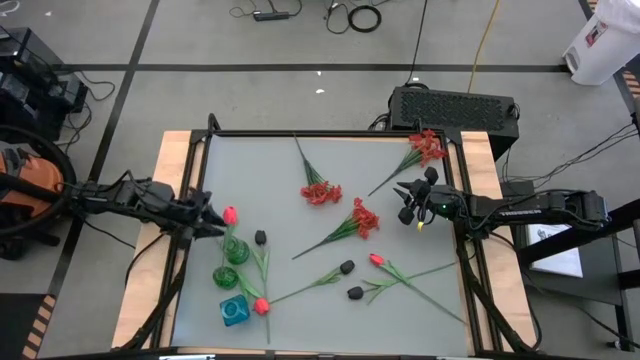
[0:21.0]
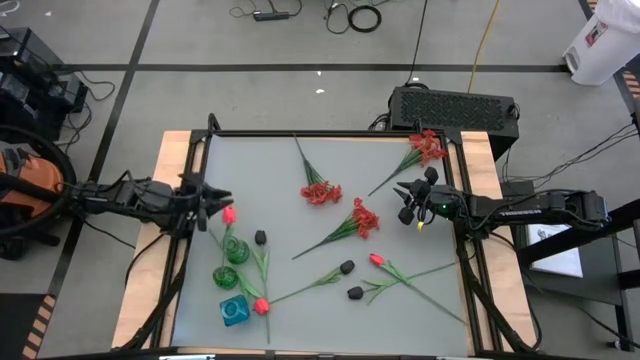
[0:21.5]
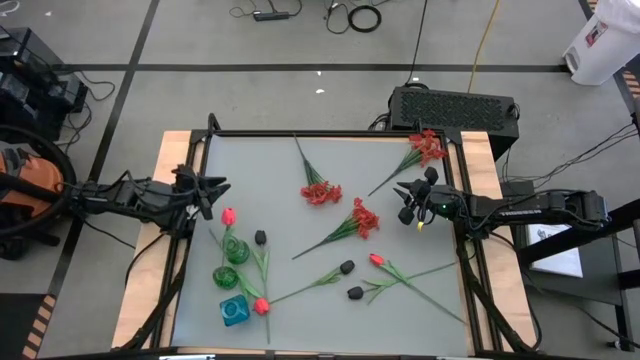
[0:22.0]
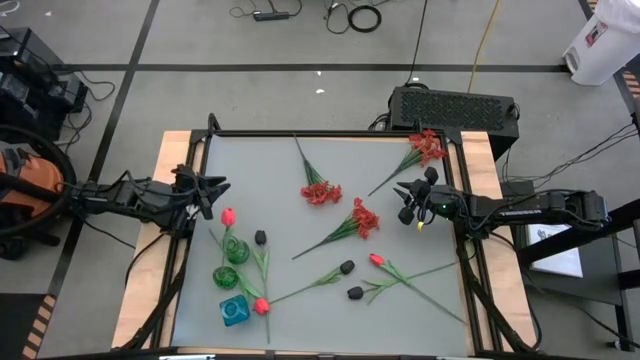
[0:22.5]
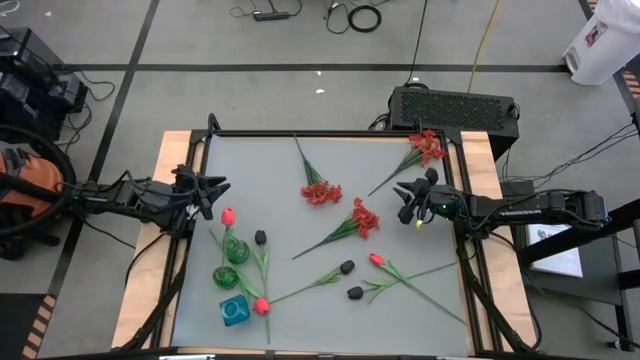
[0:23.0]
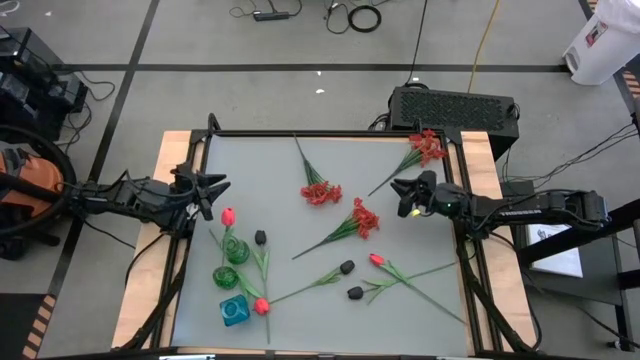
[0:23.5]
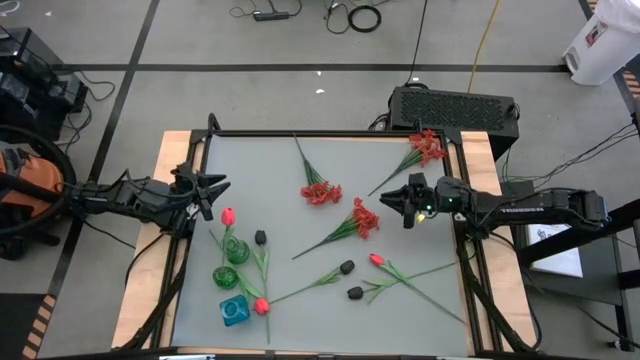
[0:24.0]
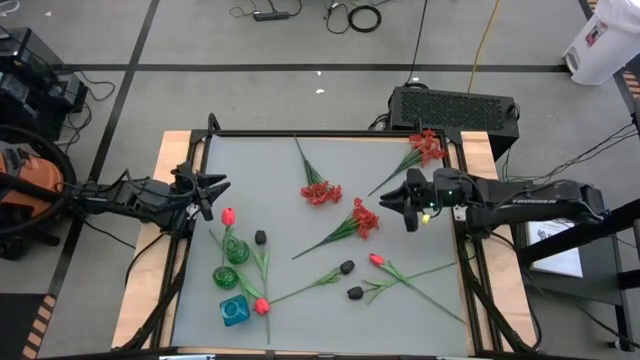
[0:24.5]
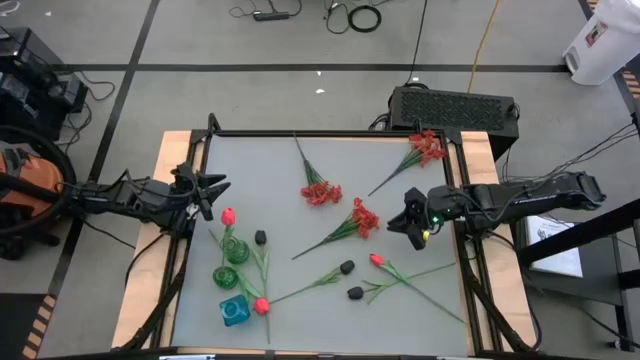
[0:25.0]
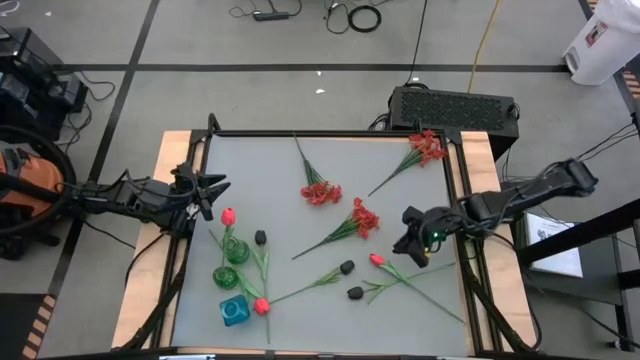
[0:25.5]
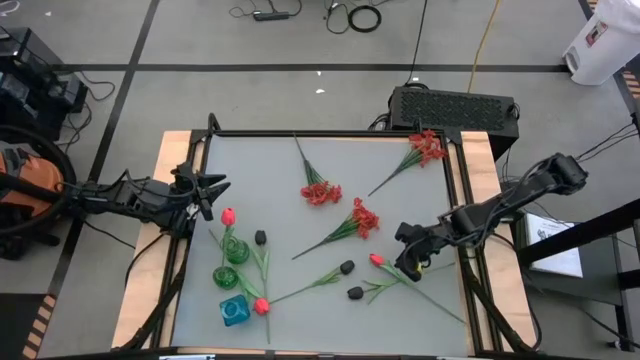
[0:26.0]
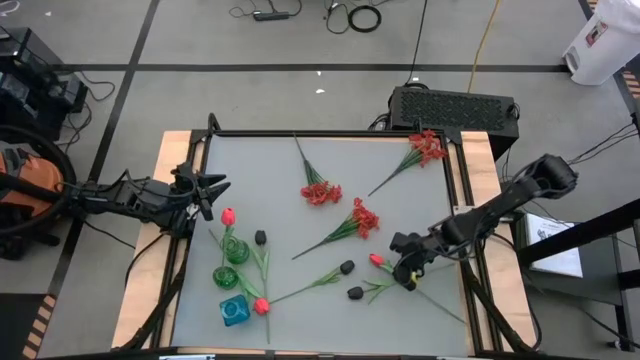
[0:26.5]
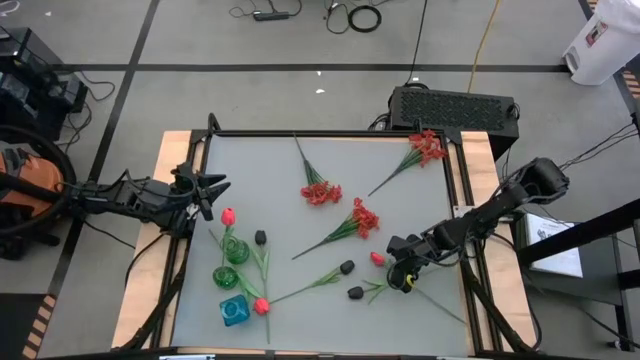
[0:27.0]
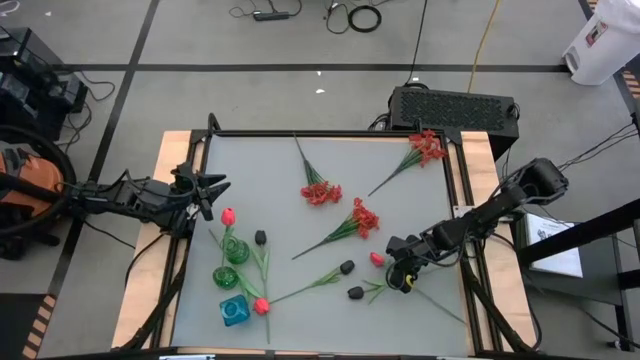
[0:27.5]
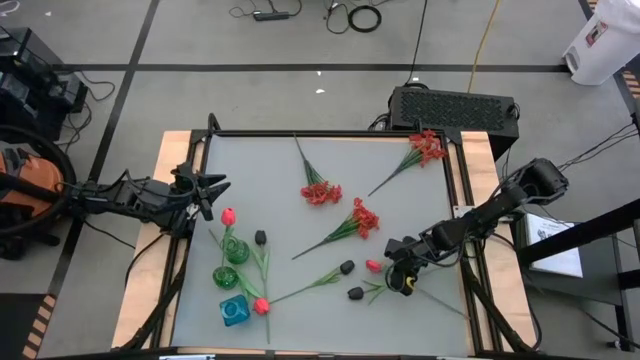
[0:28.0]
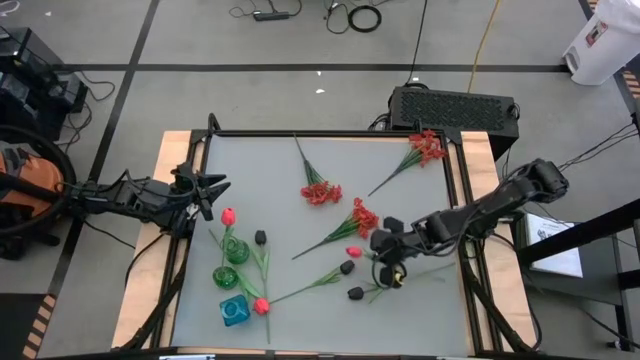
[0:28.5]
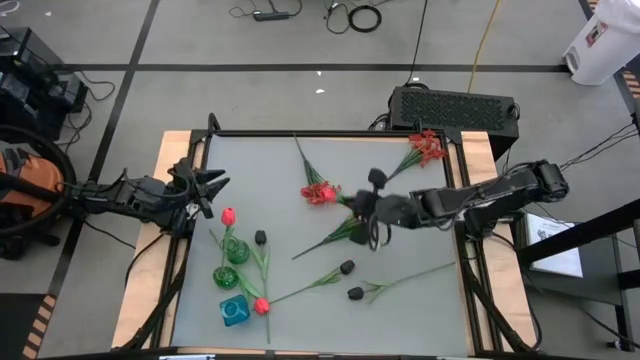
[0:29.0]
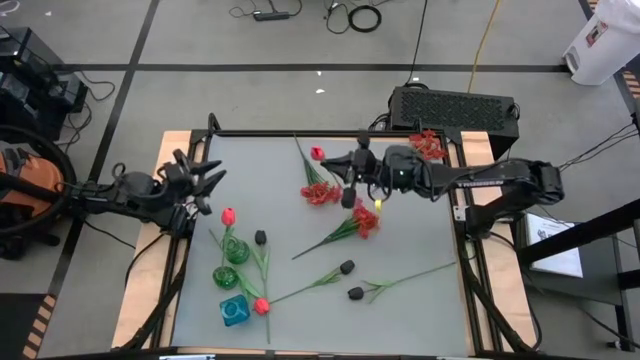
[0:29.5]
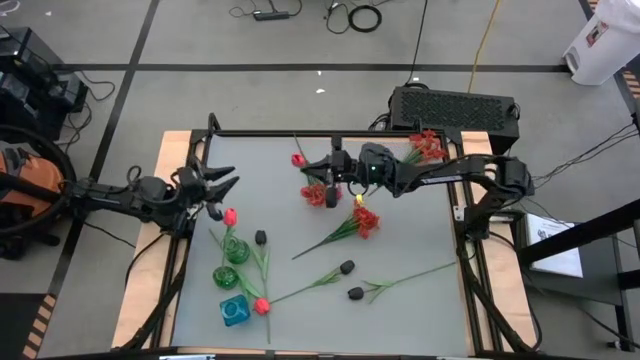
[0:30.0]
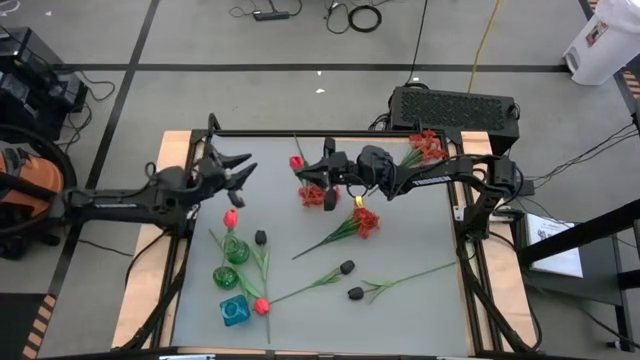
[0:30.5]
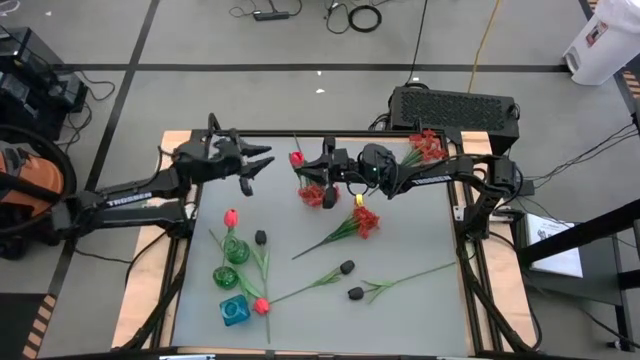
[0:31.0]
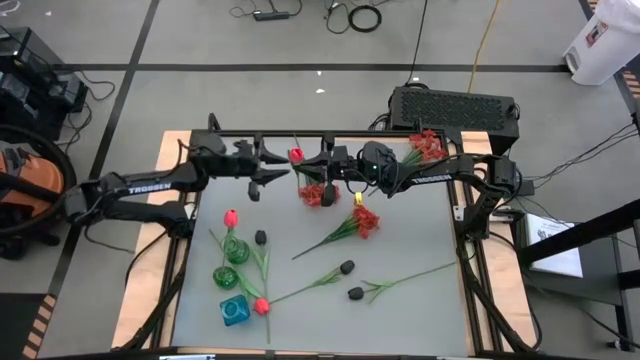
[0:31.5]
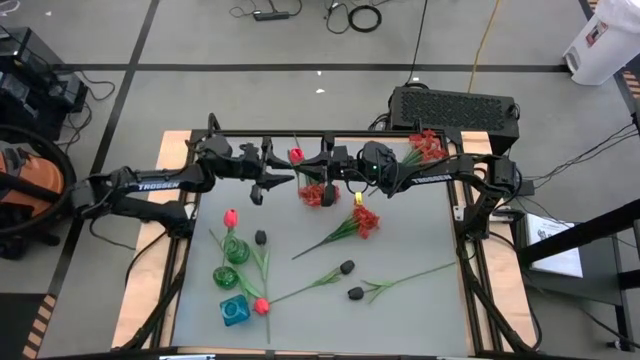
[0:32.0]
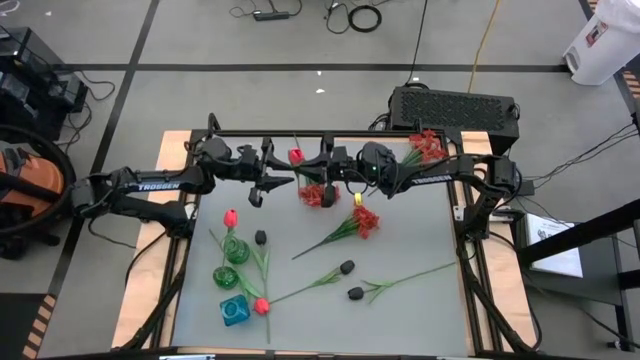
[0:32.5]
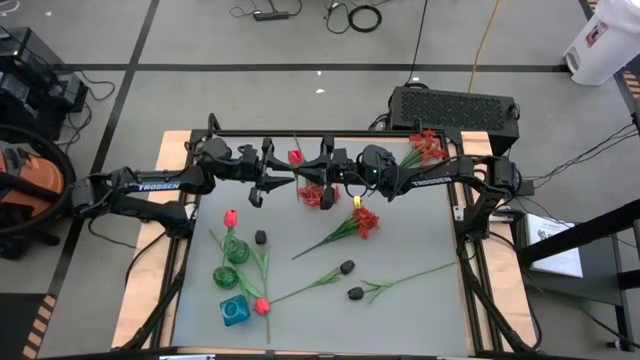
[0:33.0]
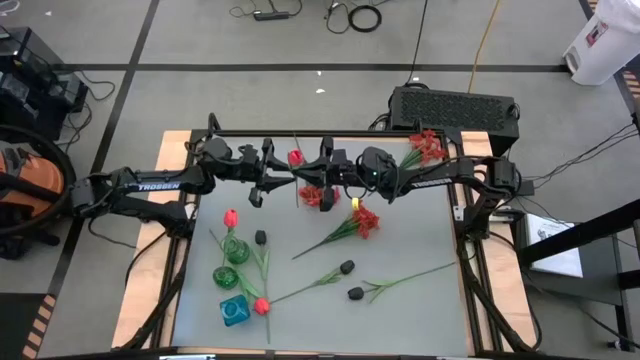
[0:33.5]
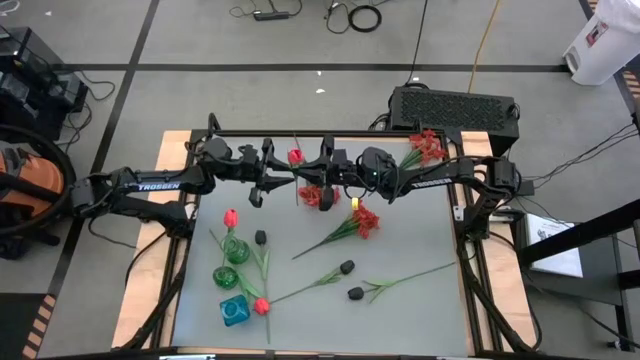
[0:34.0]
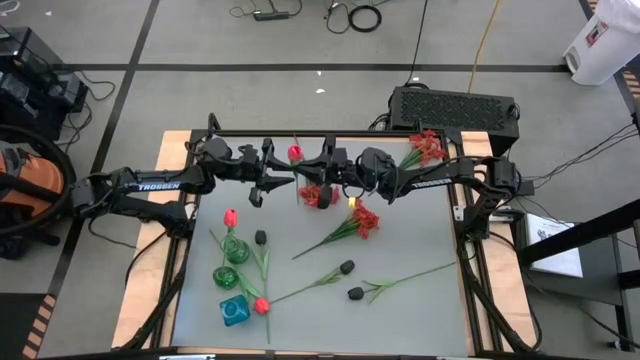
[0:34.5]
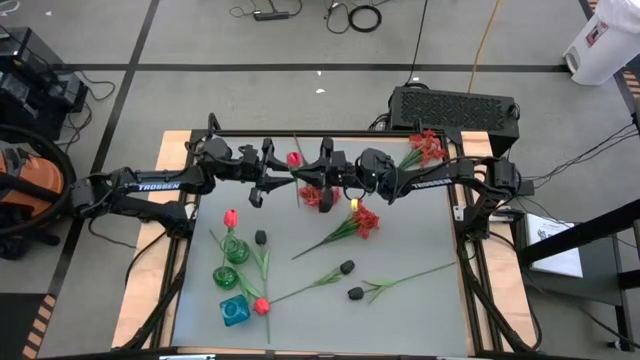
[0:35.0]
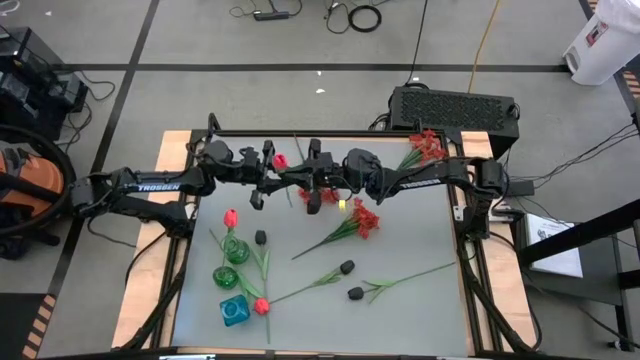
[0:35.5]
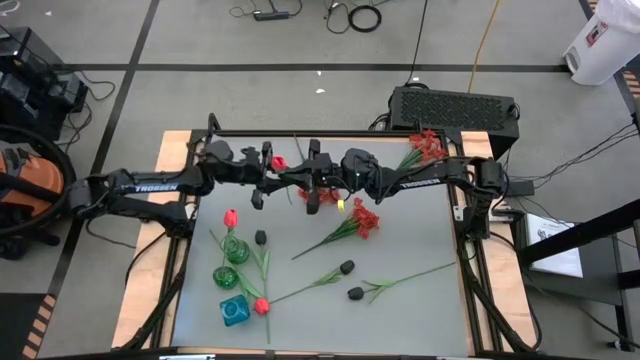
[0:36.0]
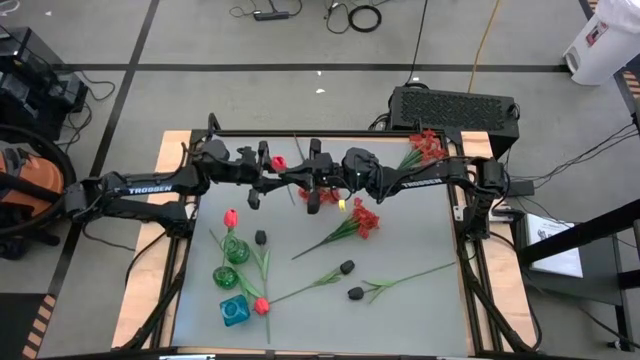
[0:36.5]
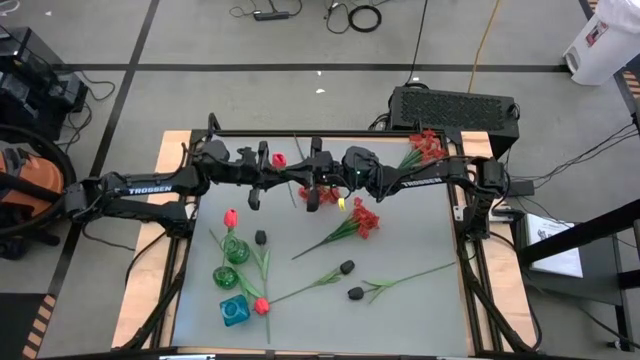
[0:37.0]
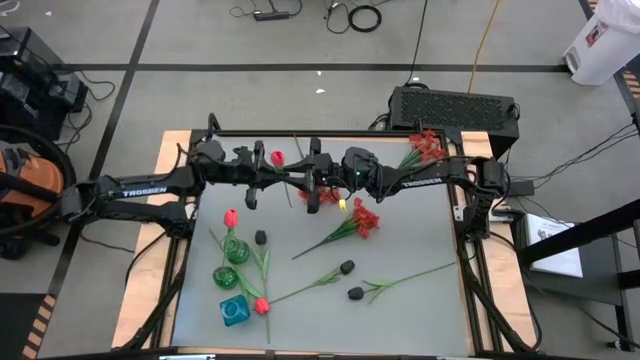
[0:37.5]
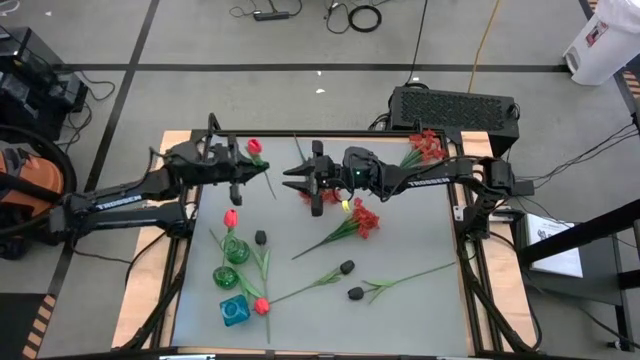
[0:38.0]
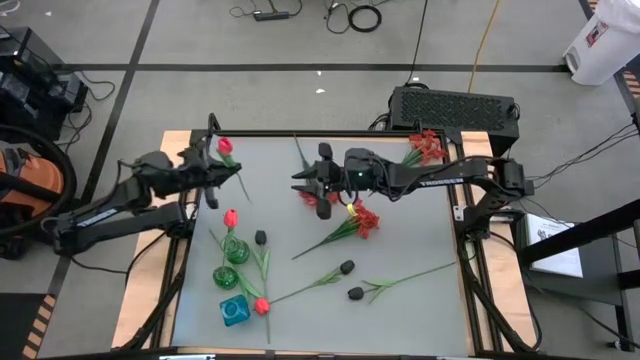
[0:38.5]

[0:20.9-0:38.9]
Task: Sort flowers into vase by color
Put the right light orange flower into the bottom green vase

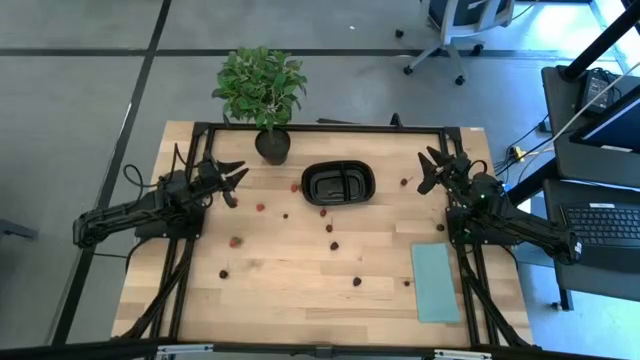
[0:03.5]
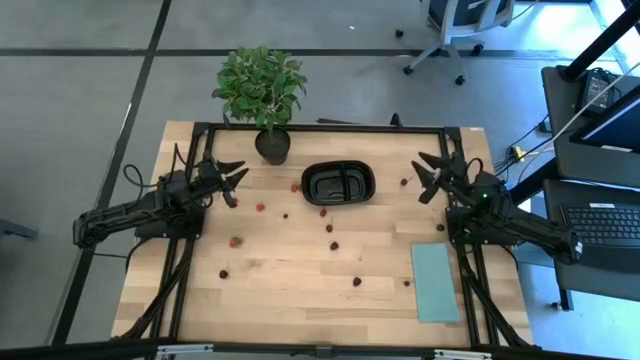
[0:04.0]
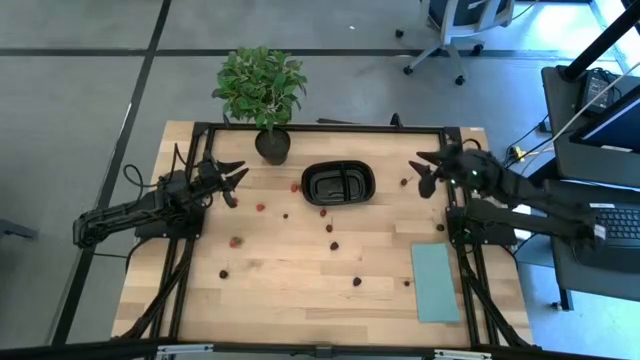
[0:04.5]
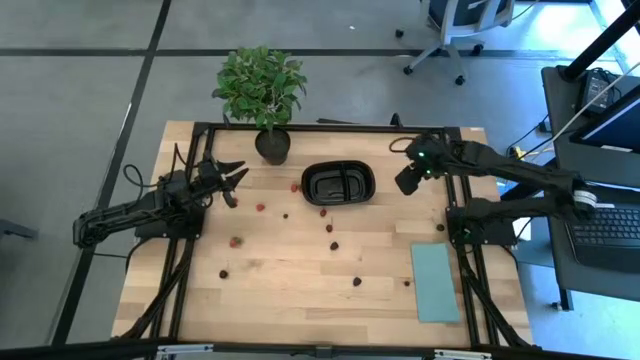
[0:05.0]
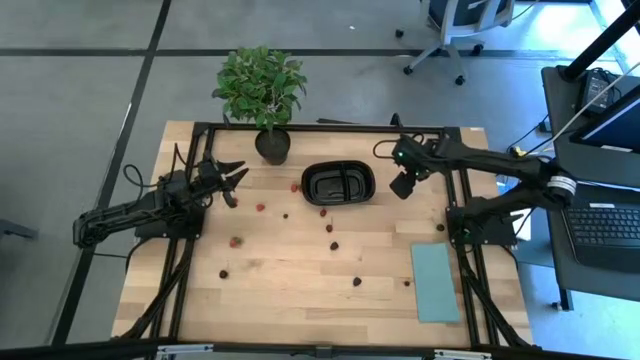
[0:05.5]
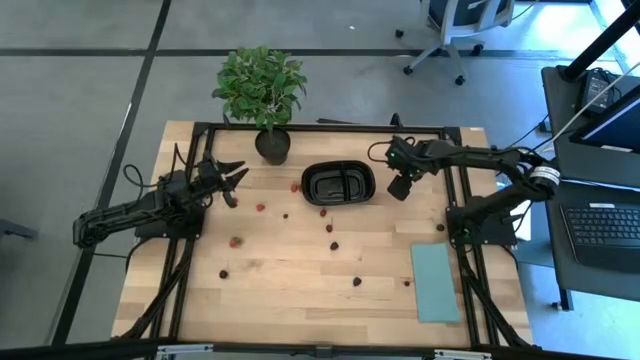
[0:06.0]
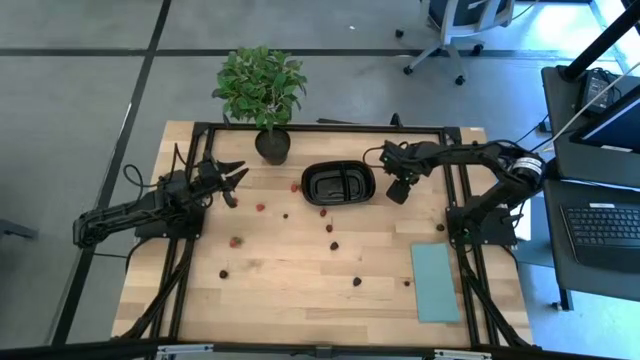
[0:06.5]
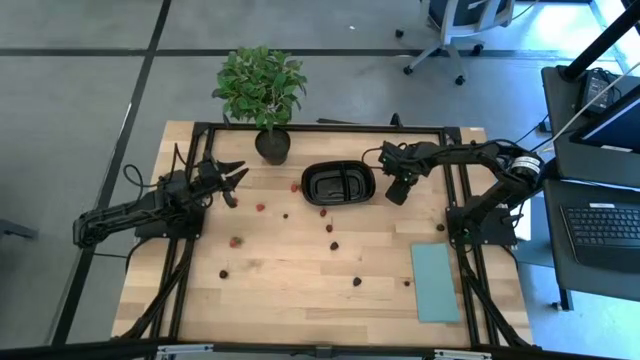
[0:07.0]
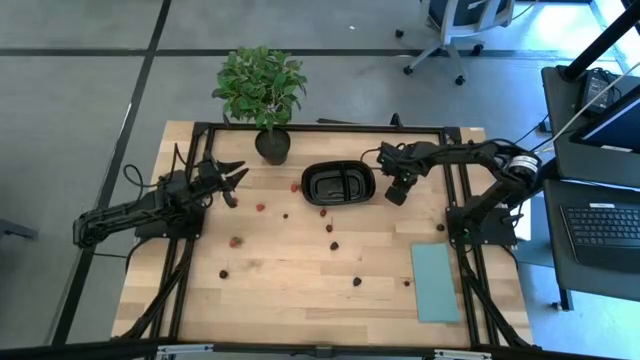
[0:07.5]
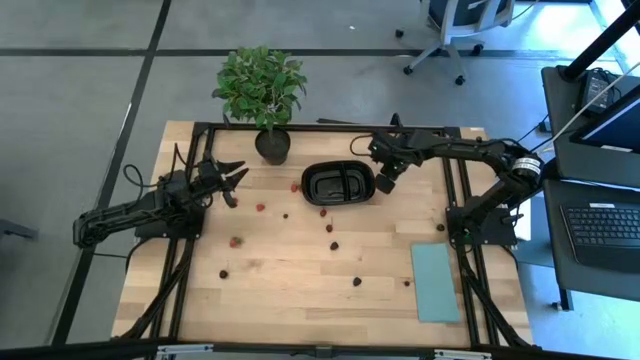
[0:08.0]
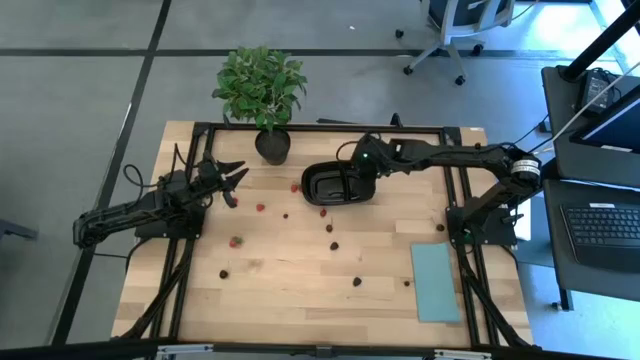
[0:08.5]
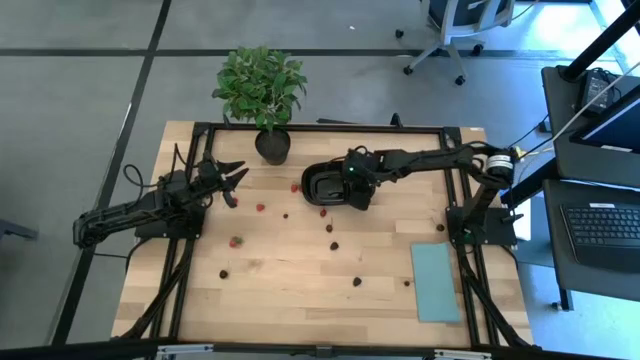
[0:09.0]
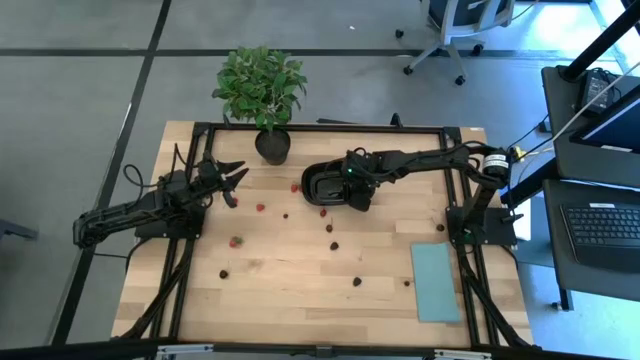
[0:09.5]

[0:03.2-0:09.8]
Task: Pick and placing Produce into tupperware
Put the top red cherry into the black container
